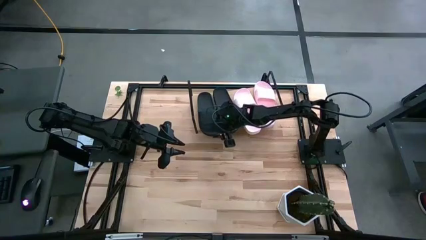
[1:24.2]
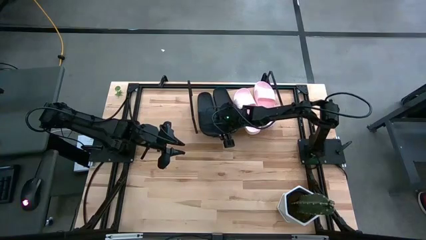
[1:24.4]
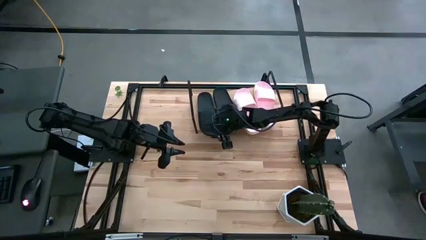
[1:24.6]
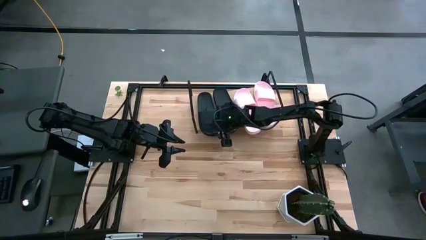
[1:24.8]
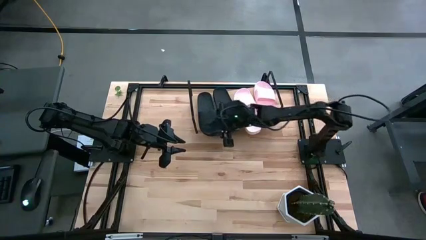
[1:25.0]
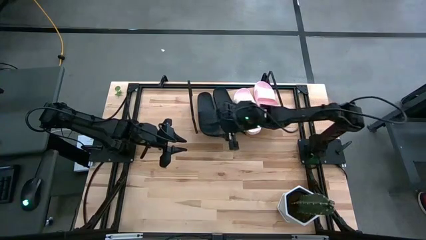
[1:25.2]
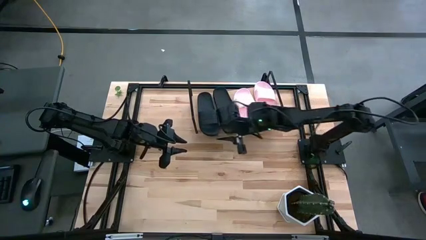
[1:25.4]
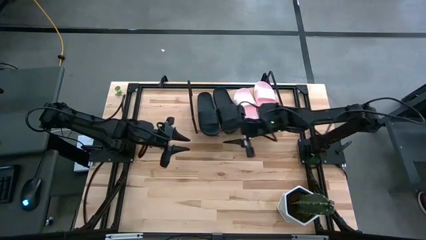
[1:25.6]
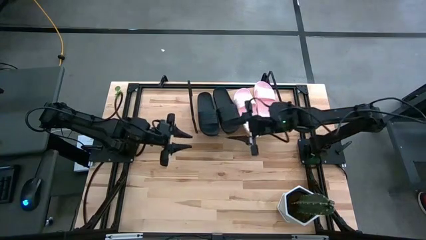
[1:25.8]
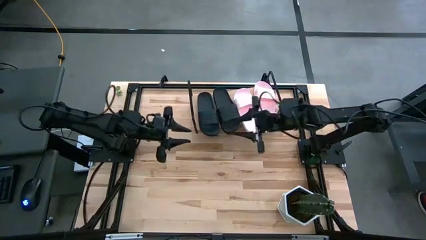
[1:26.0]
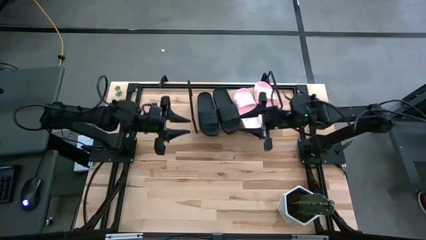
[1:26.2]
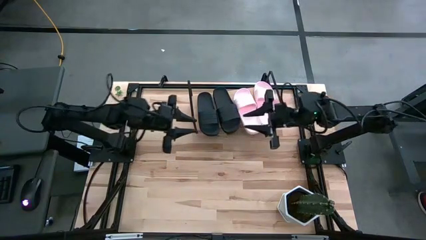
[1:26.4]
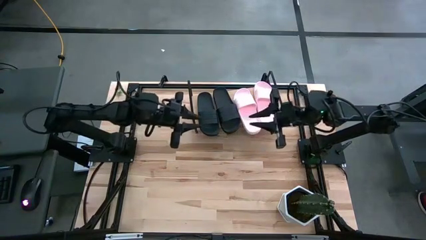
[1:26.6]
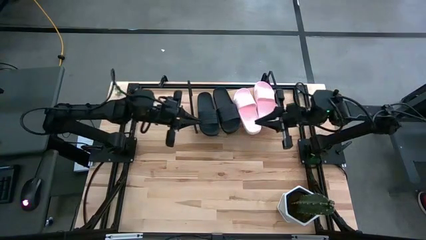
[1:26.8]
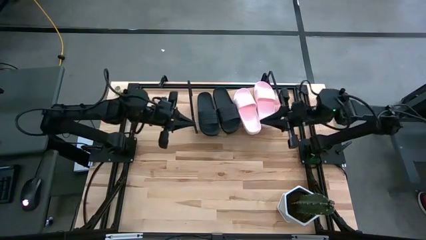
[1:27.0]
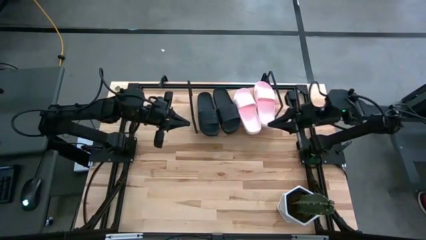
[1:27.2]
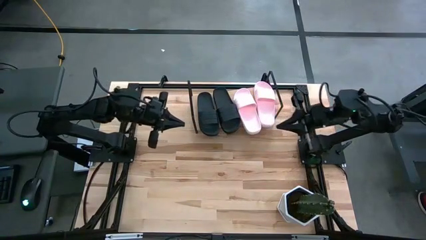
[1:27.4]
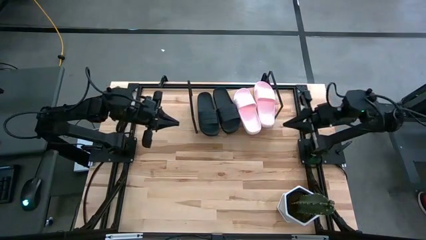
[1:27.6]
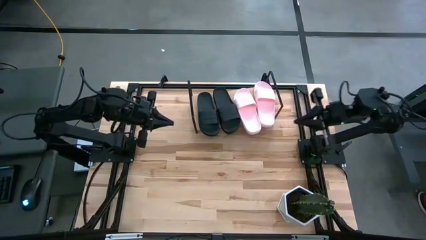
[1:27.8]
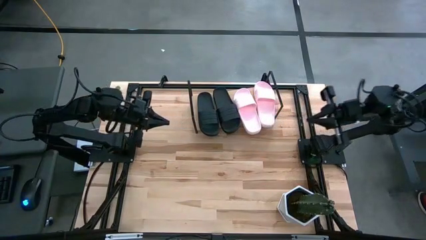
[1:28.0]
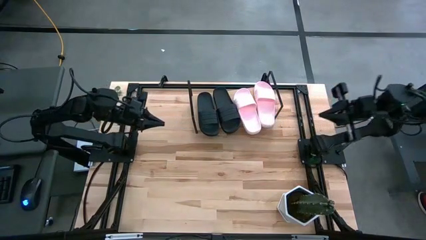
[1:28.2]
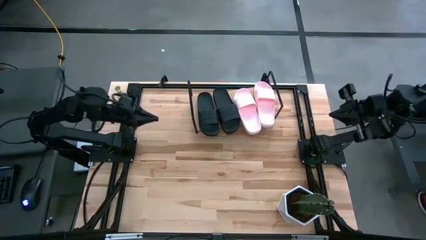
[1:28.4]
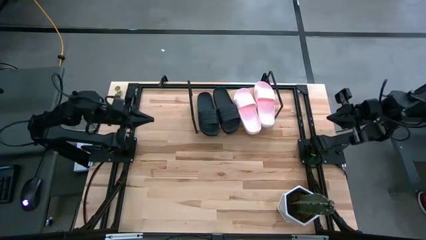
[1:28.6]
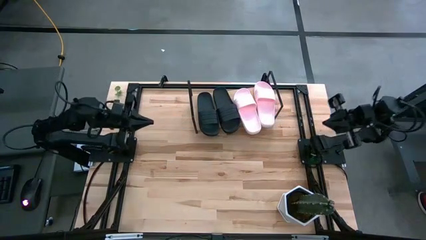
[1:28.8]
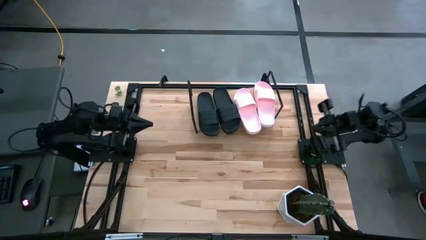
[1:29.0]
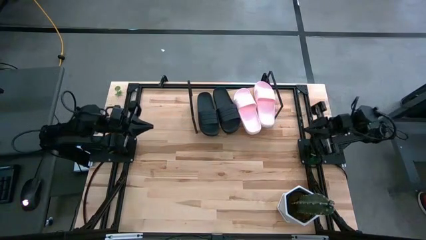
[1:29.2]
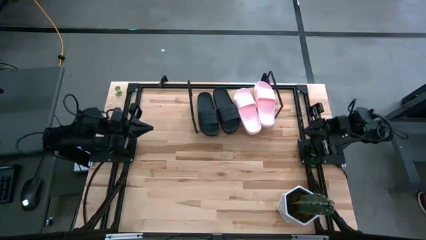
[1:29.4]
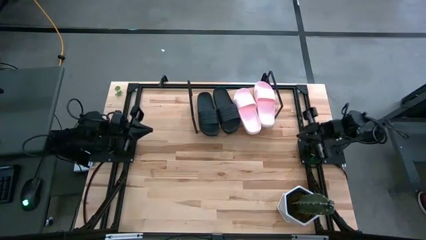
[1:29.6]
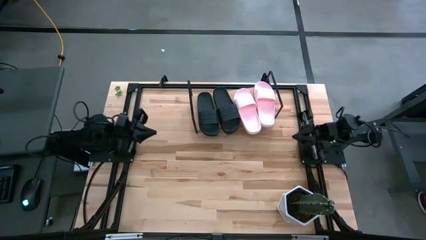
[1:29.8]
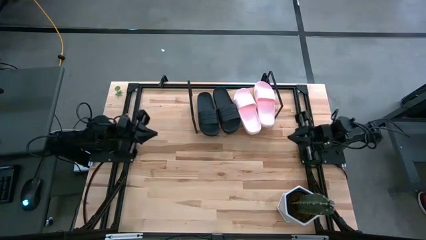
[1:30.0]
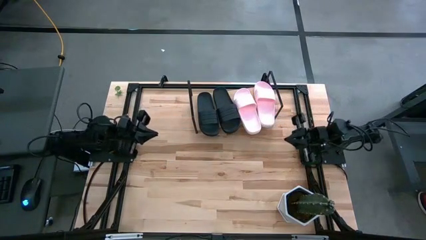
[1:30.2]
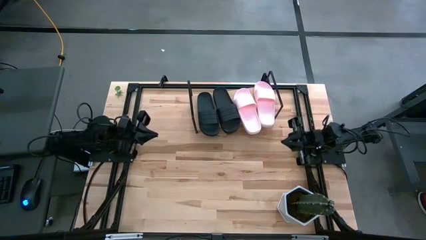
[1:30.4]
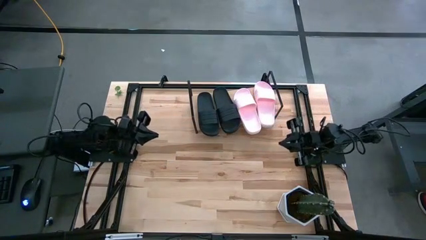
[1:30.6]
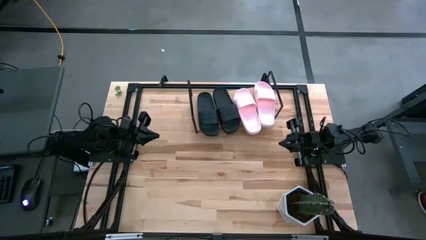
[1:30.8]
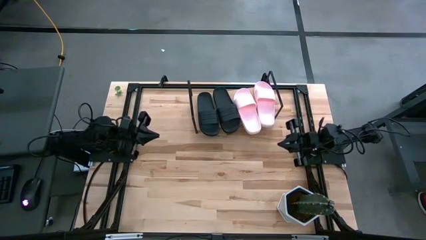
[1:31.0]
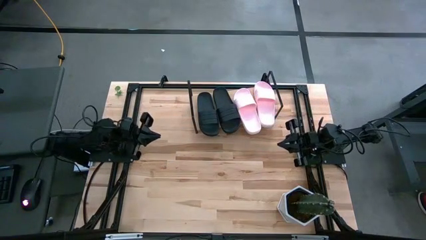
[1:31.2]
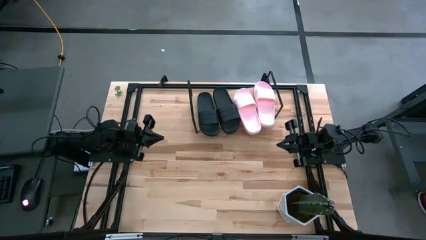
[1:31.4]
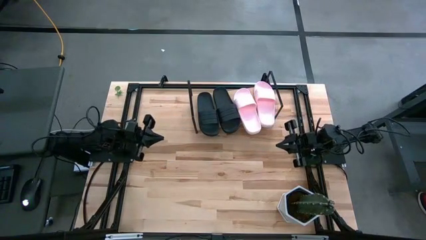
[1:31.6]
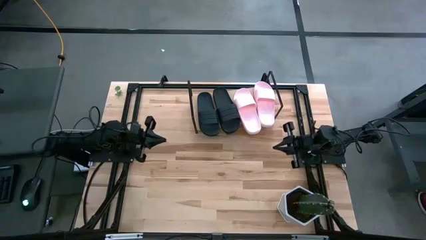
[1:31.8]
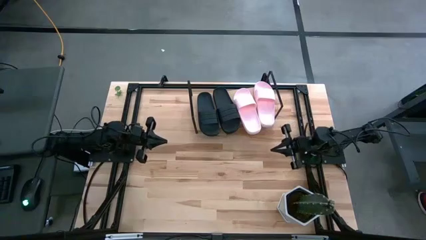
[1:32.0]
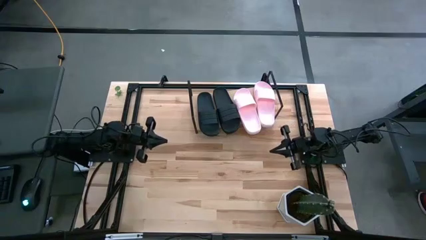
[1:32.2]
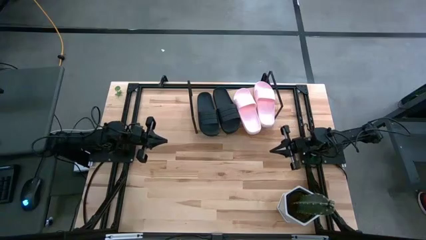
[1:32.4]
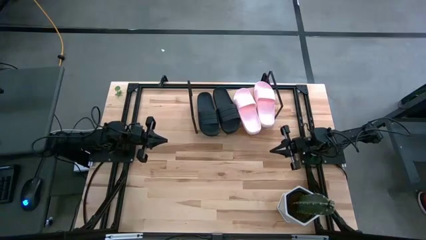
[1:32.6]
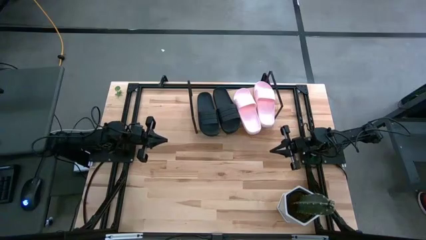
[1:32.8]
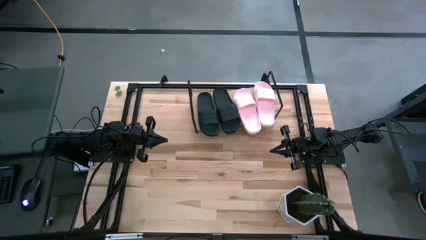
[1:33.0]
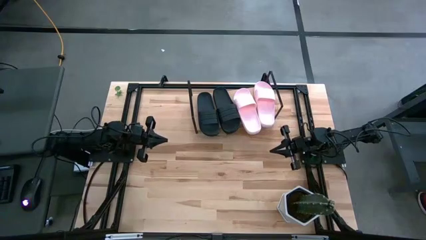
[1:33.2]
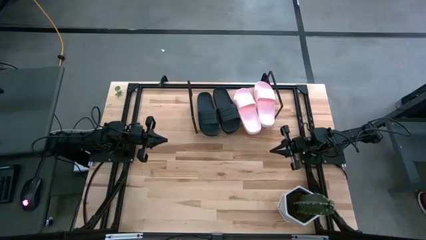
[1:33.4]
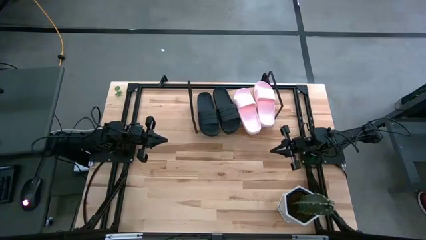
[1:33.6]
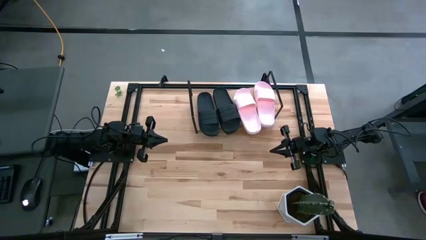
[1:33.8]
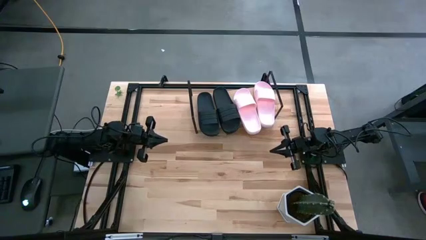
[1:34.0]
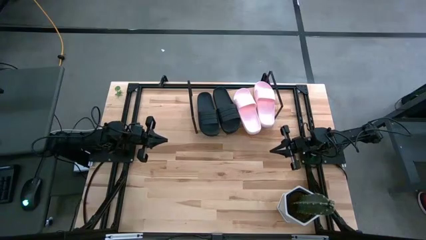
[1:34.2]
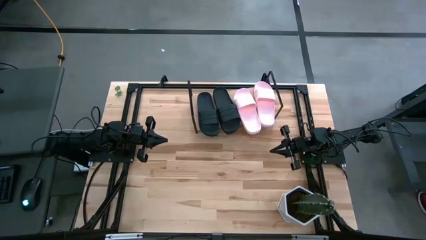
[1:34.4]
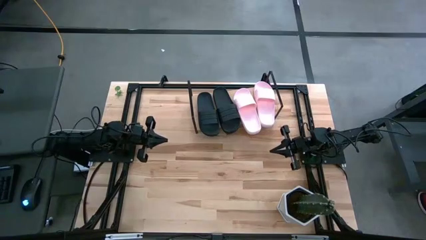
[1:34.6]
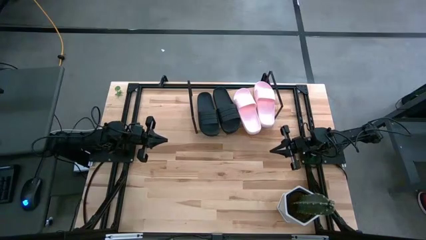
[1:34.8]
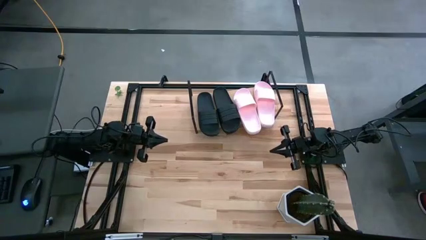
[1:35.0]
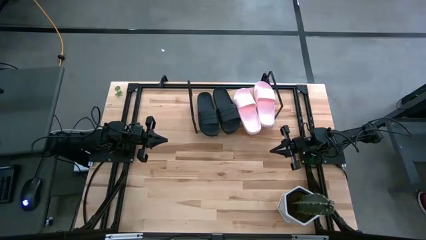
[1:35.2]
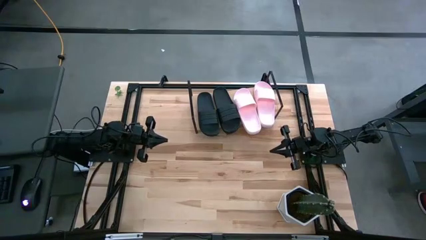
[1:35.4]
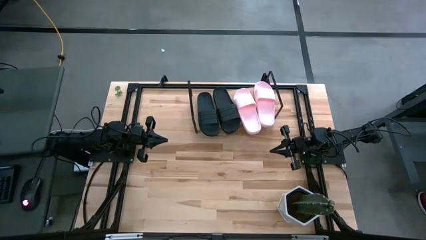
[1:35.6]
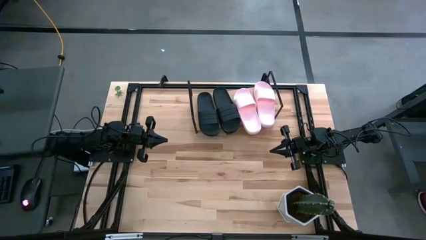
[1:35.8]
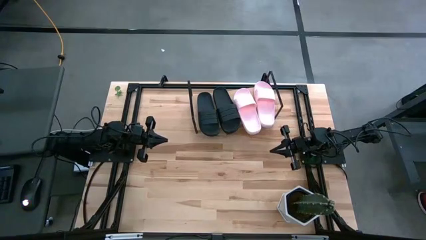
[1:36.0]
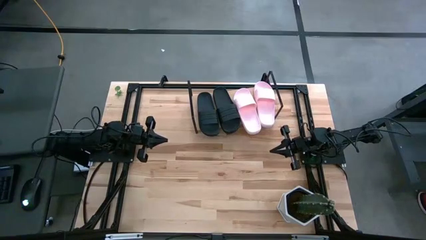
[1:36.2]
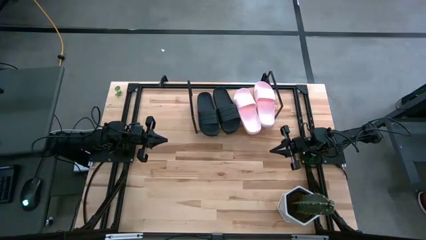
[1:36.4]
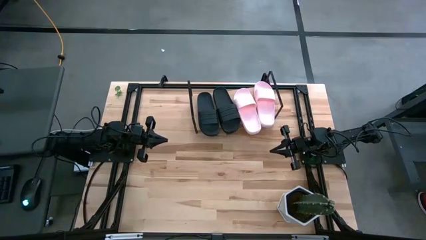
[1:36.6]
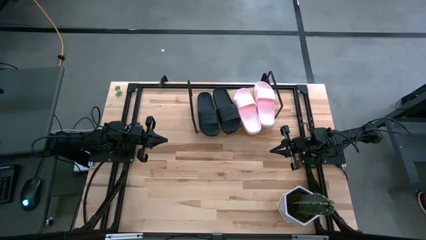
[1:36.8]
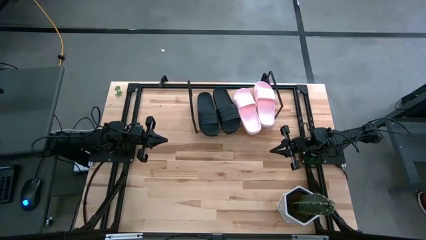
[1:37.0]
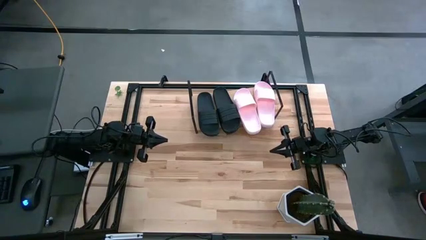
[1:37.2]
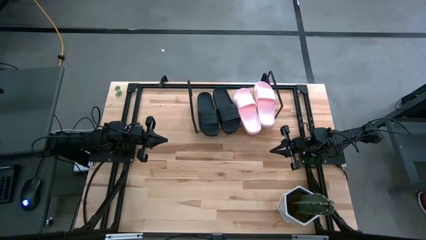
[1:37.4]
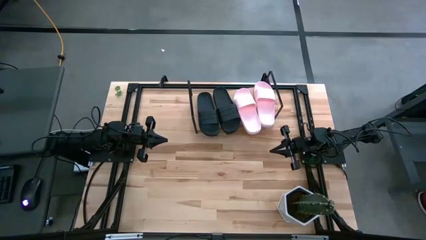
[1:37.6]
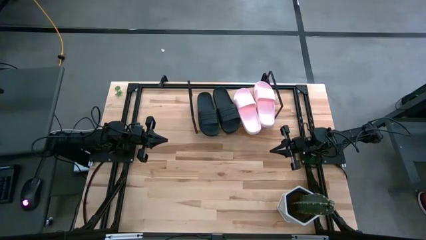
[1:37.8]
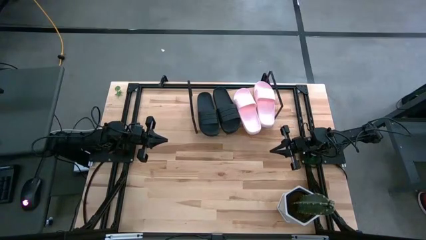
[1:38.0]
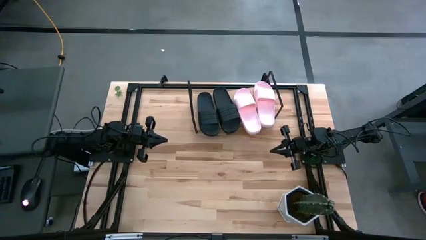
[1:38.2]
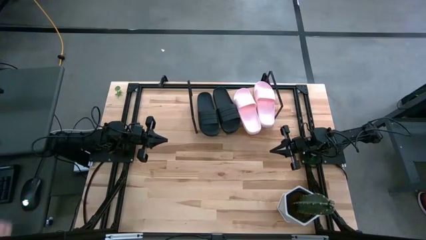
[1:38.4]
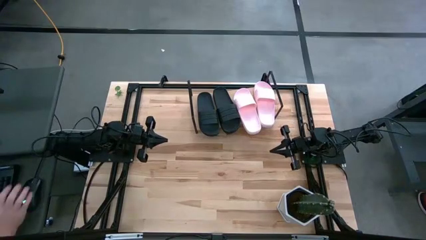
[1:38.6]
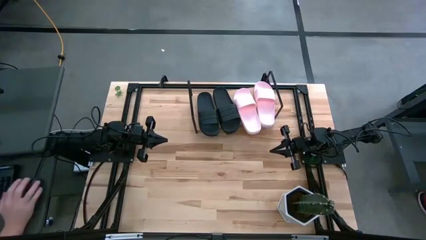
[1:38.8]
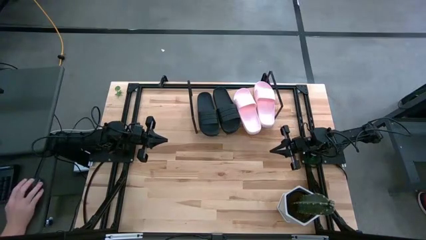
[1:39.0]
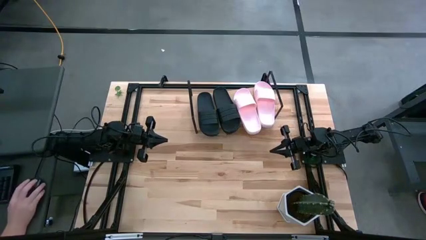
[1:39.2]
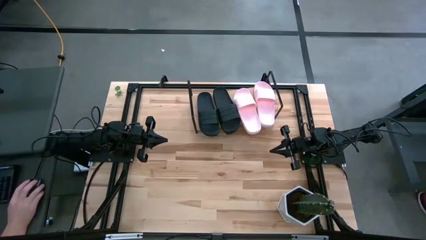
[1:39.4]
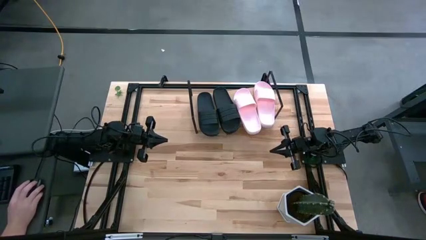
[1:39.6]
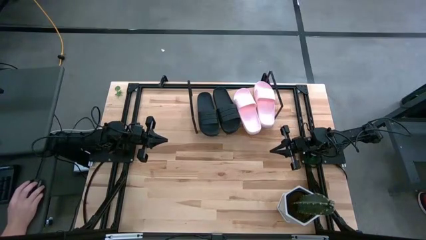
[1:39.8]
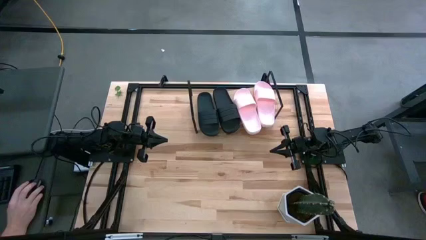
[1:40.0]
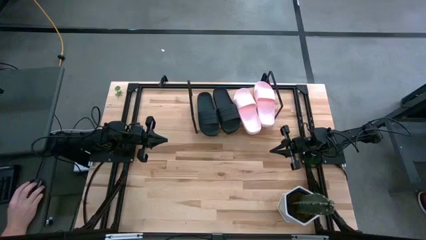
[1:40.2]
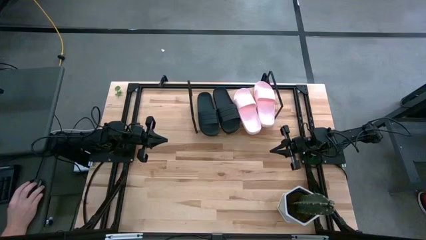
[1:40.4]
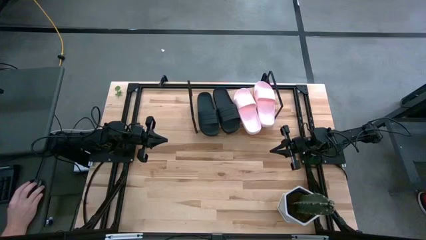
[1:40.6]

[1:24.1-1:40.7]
Task: Pick and place slides into the shelf
Return to Home Position
